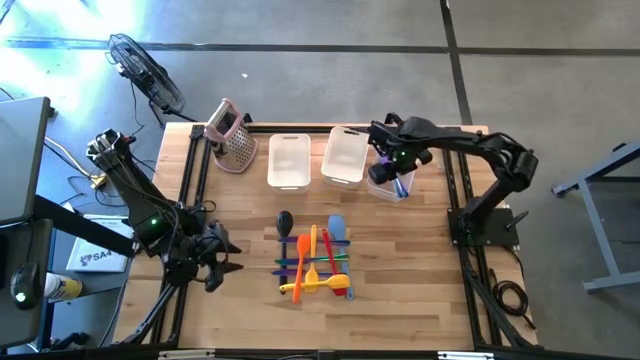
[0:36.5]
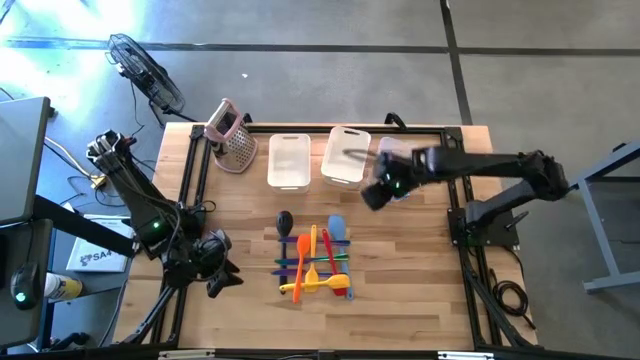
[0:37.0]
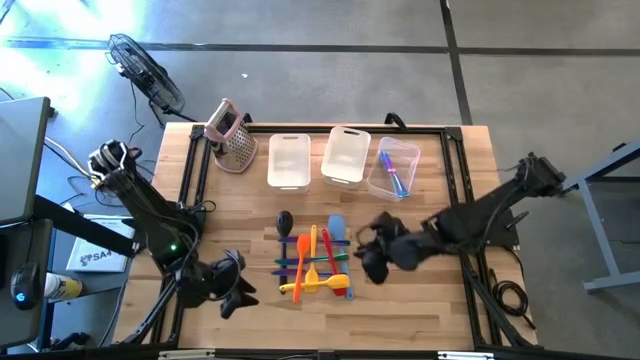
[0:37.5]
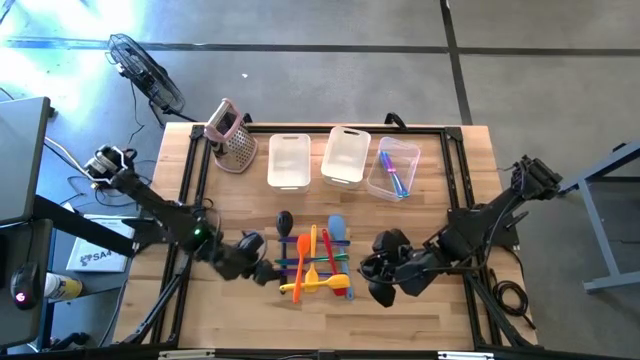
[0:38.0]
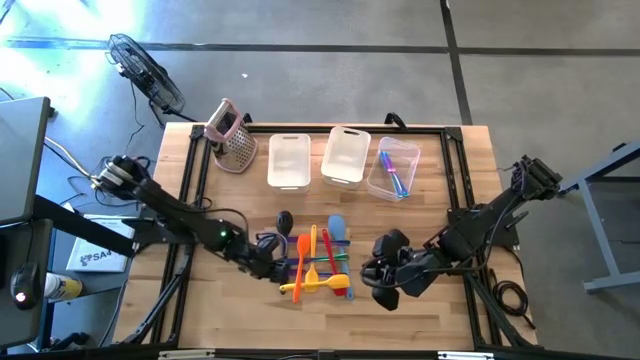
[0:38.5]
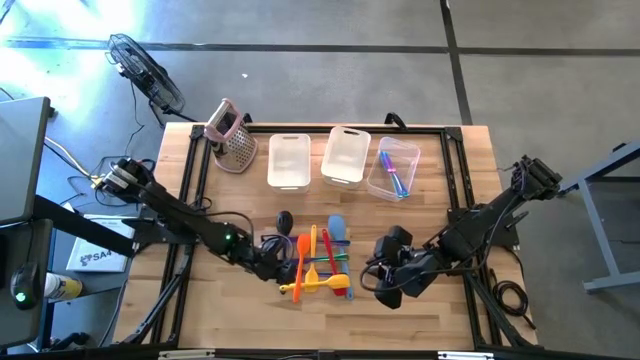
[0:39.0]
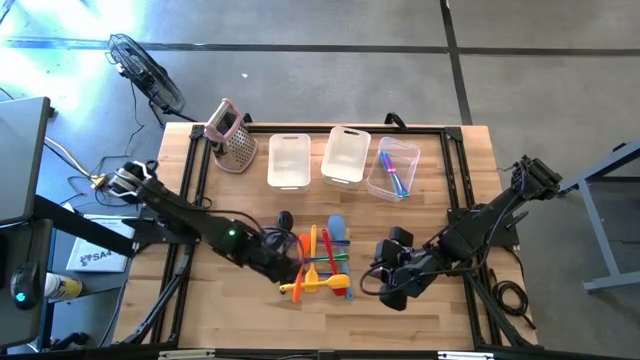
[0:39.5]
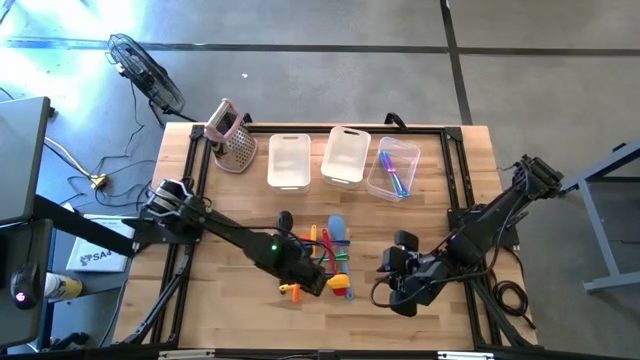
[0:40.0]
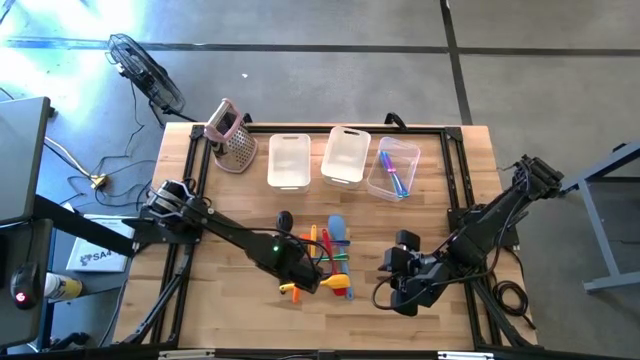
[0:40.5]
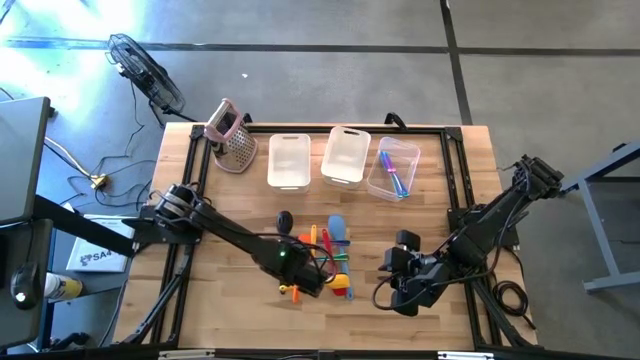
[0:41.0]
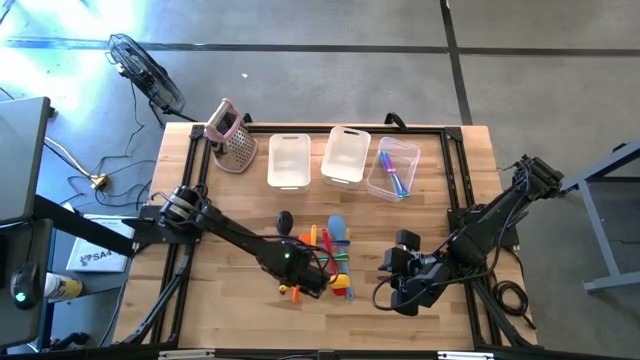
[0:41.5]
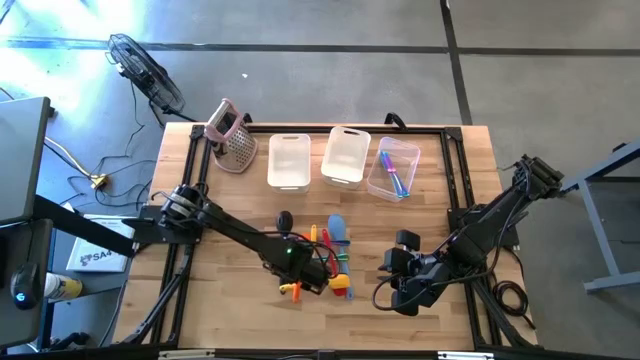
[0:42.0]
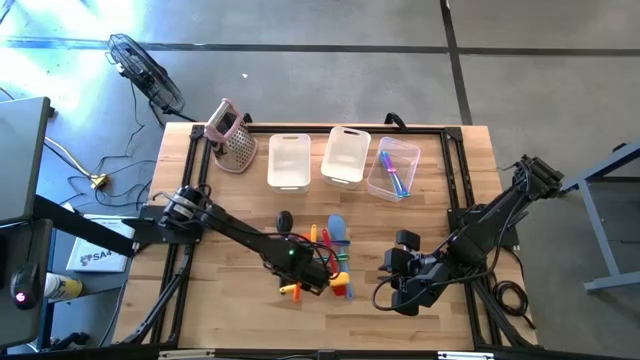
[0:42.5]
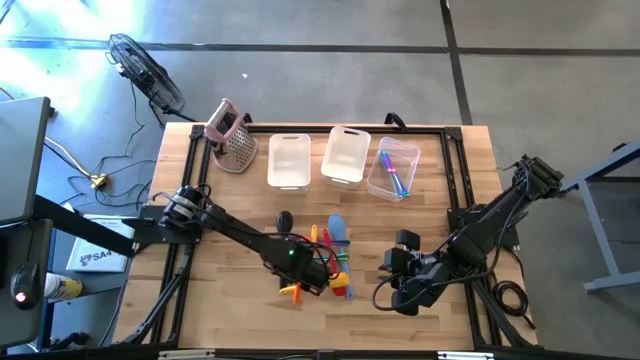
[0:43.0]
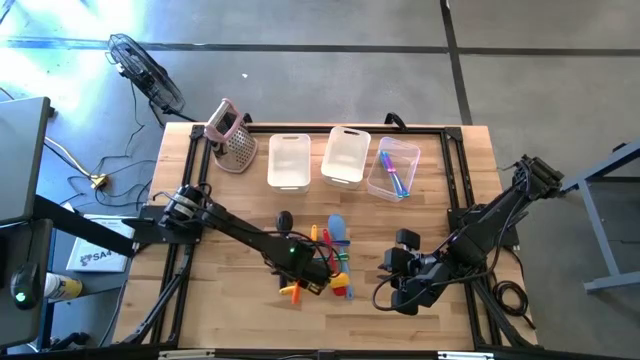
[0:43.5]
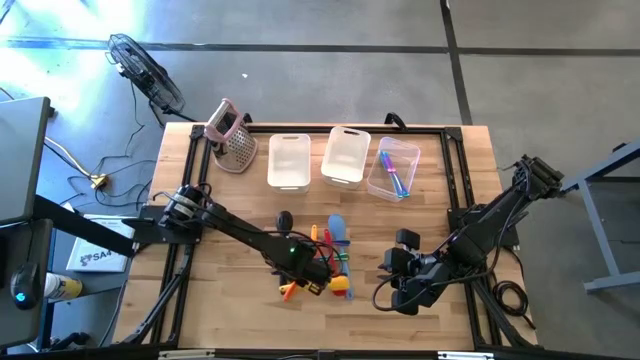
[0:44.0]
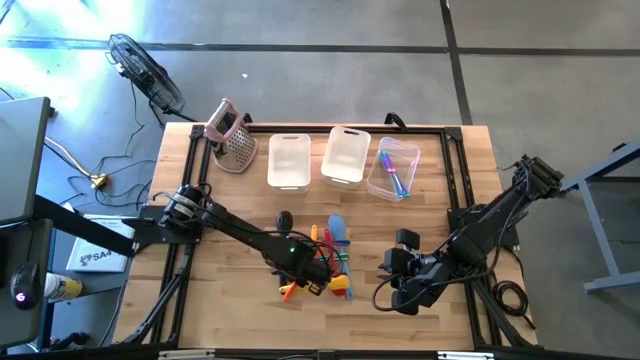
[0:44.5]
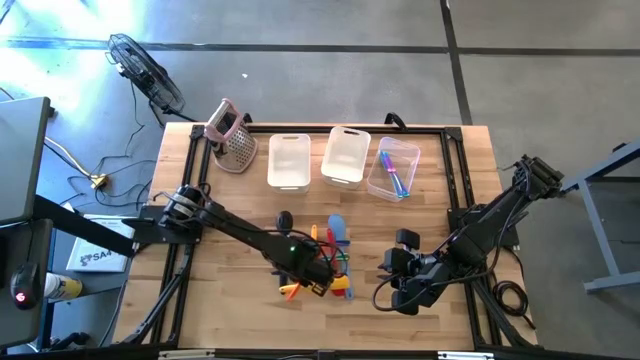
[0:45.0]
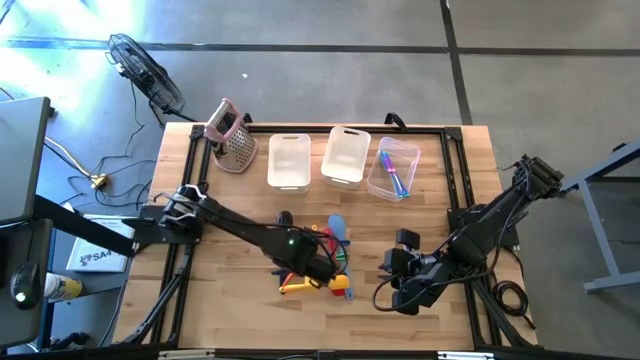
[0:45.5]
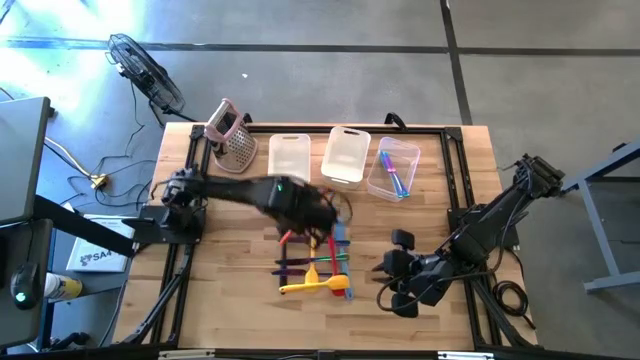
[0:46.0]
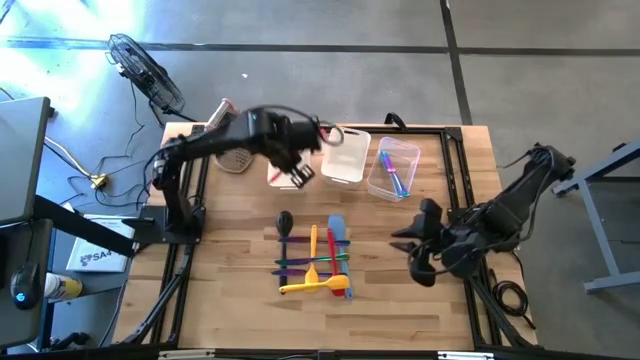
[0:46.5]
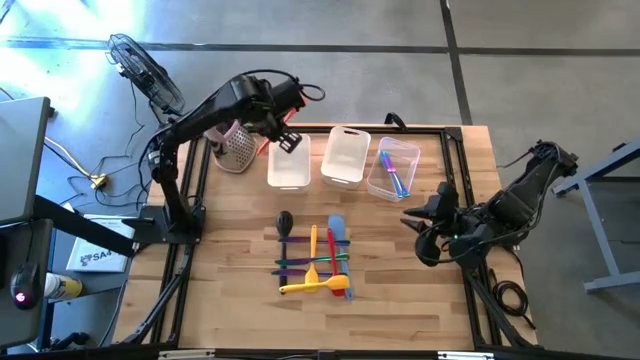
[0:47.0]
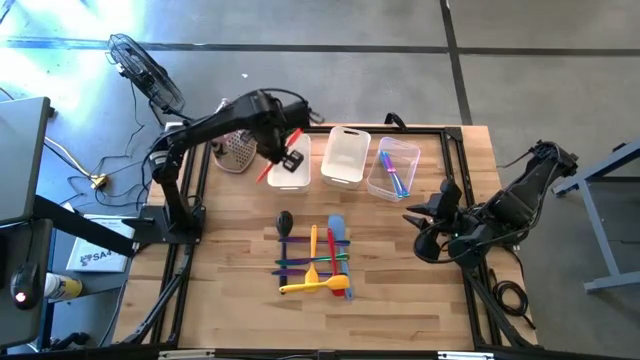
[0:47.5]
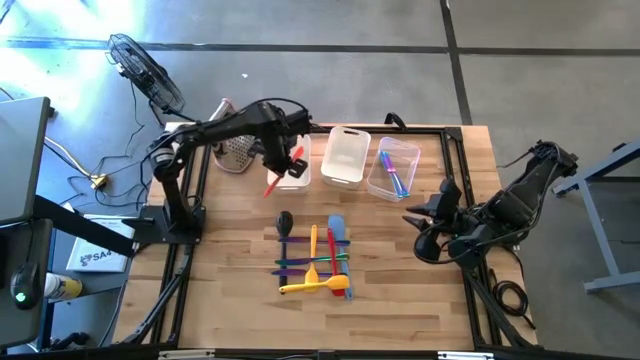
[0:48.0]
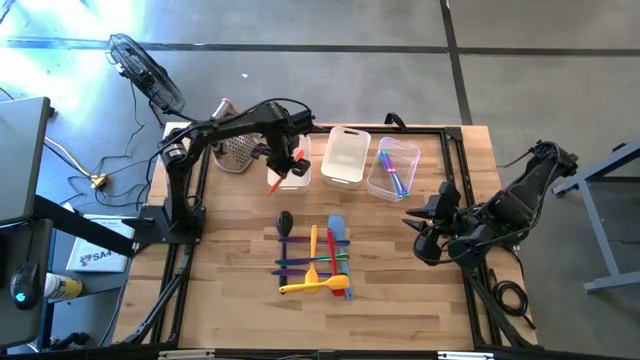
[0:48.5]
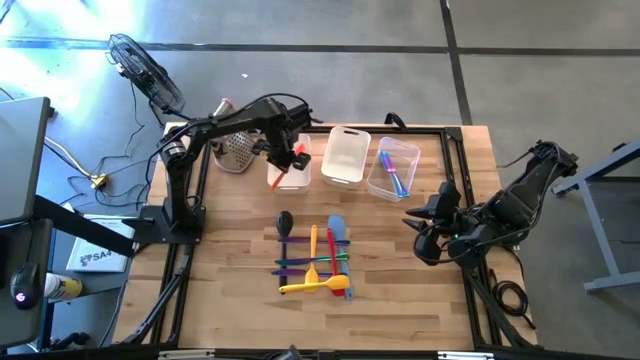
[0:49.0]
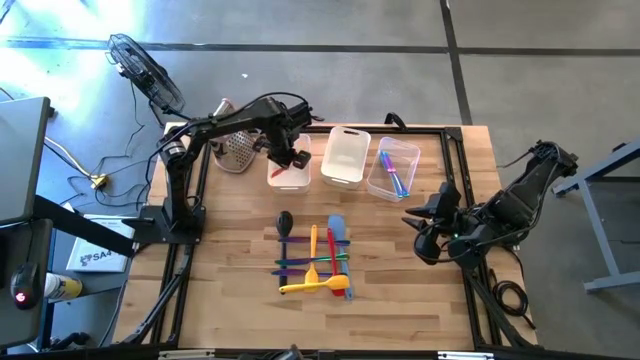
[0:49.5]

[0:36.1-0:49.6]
Task: Pick & Place Kitchen Items
Put the orange spatula into the left white bin

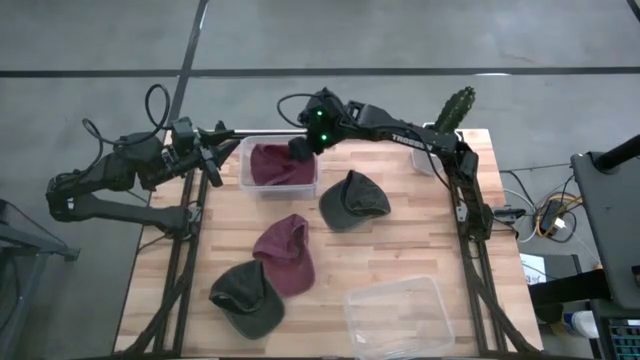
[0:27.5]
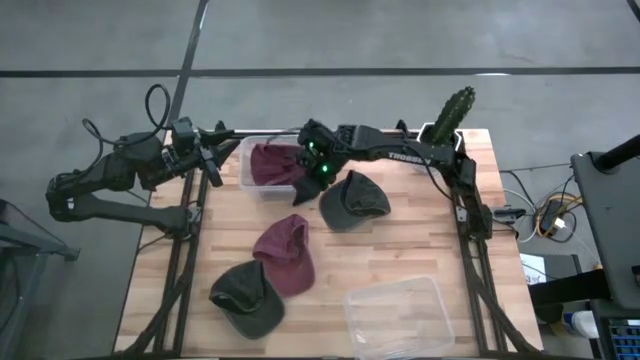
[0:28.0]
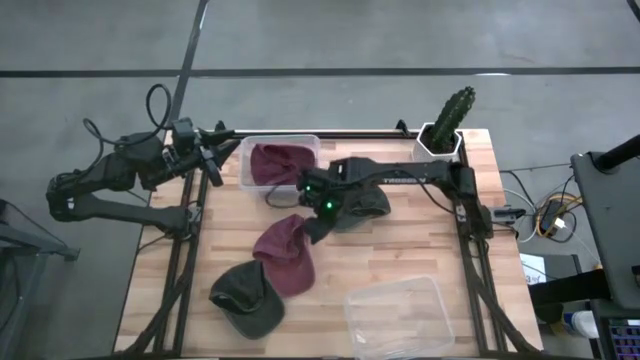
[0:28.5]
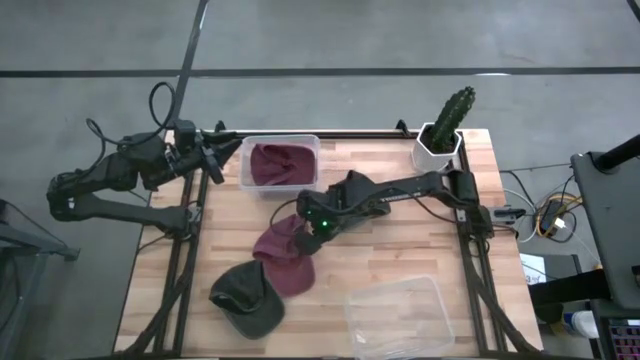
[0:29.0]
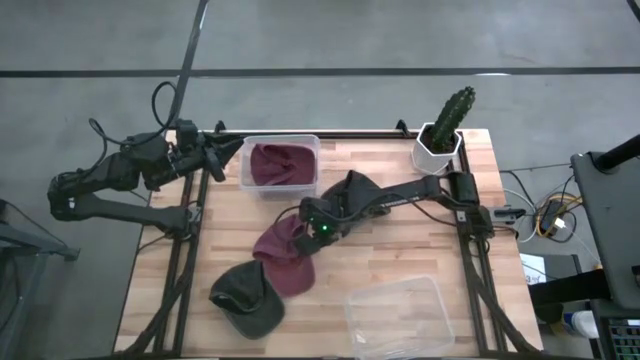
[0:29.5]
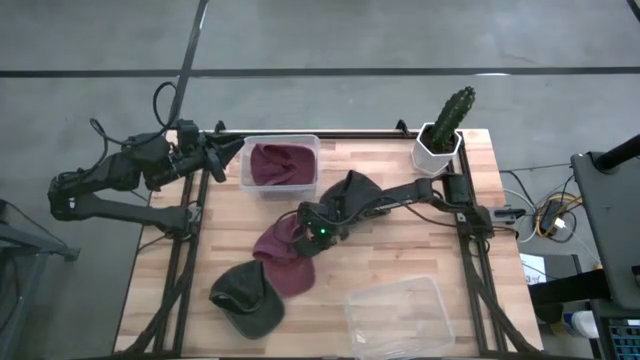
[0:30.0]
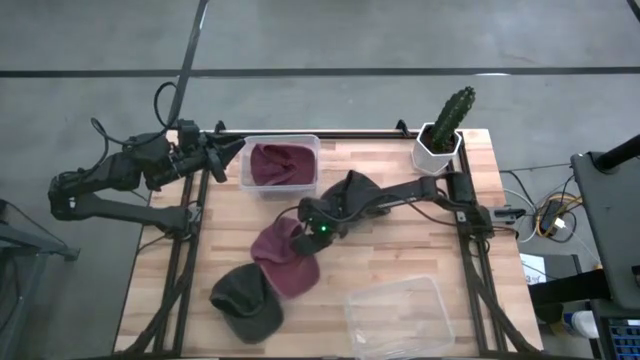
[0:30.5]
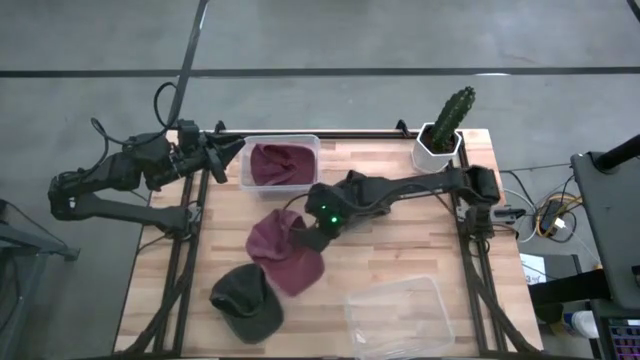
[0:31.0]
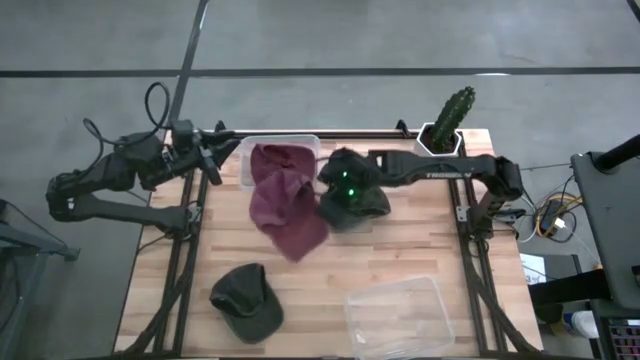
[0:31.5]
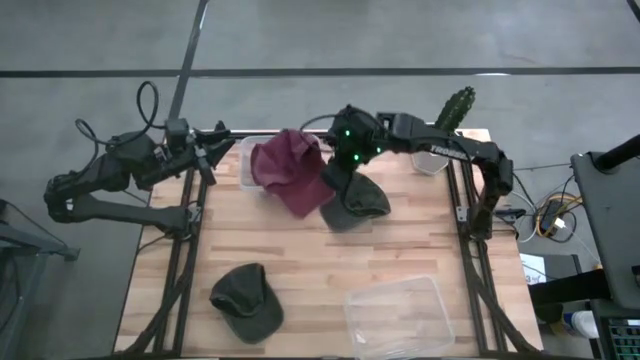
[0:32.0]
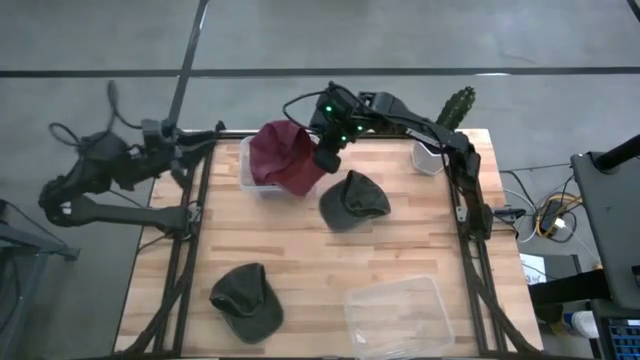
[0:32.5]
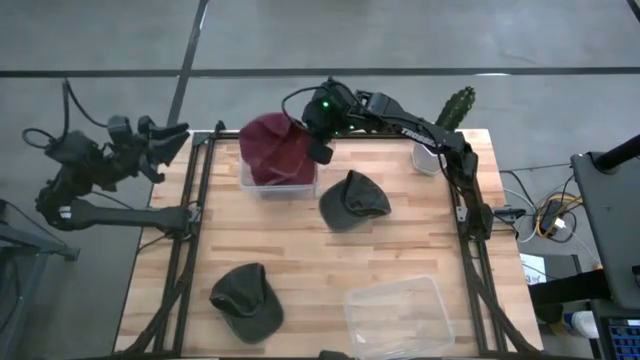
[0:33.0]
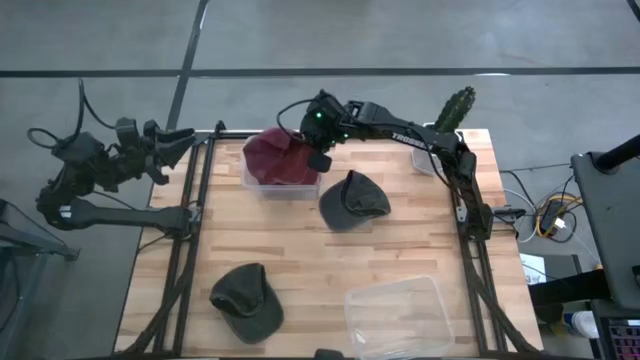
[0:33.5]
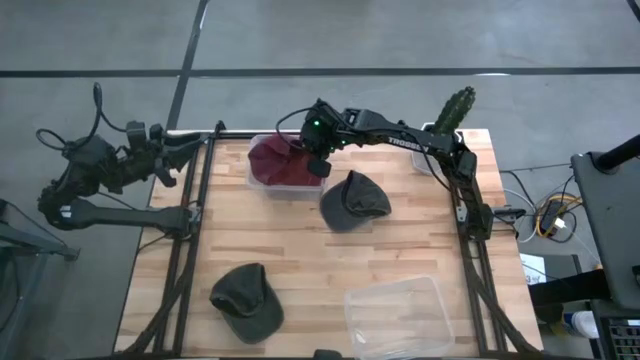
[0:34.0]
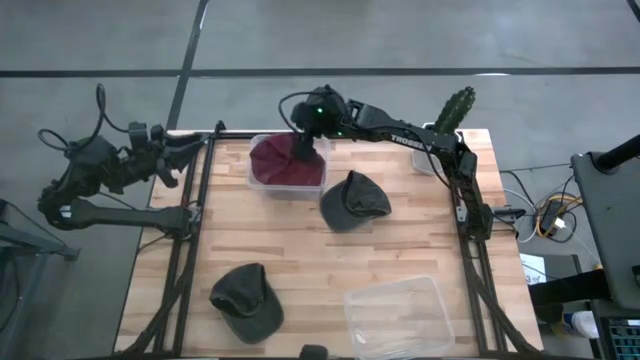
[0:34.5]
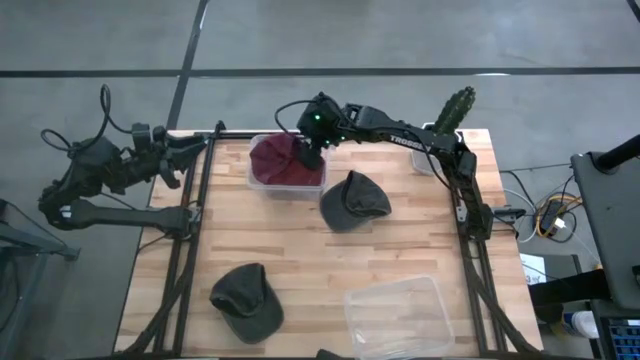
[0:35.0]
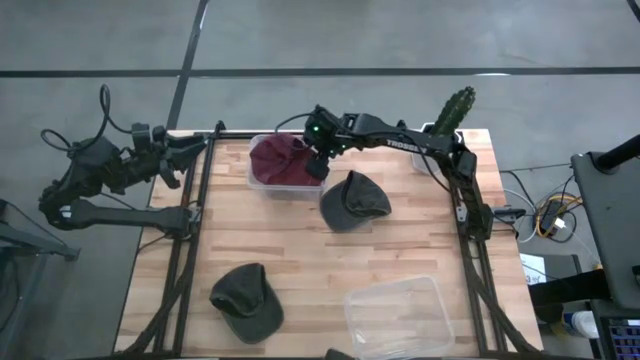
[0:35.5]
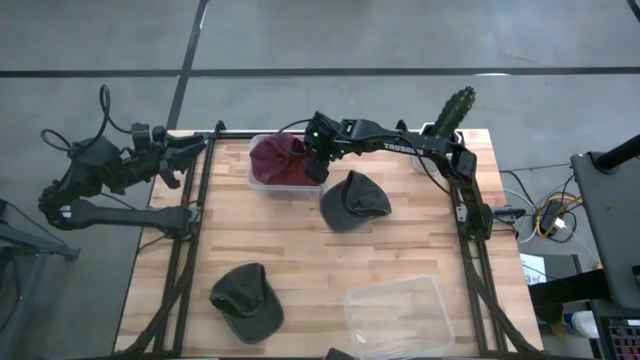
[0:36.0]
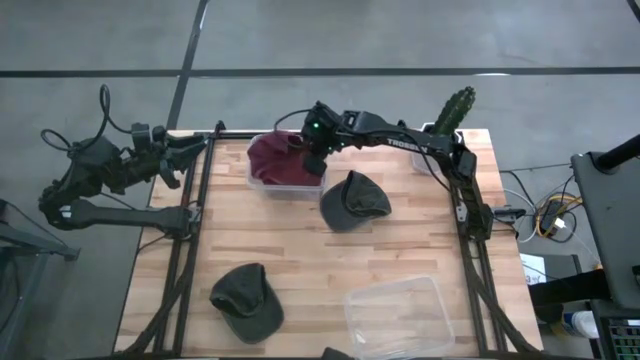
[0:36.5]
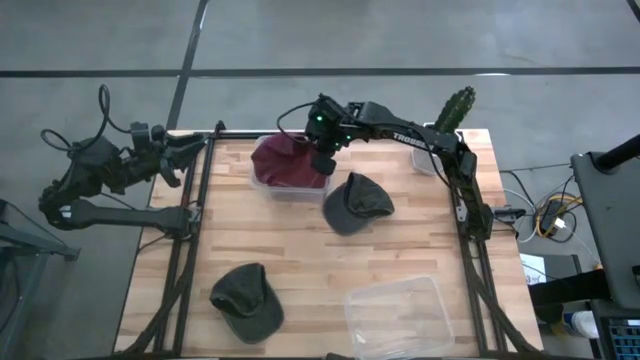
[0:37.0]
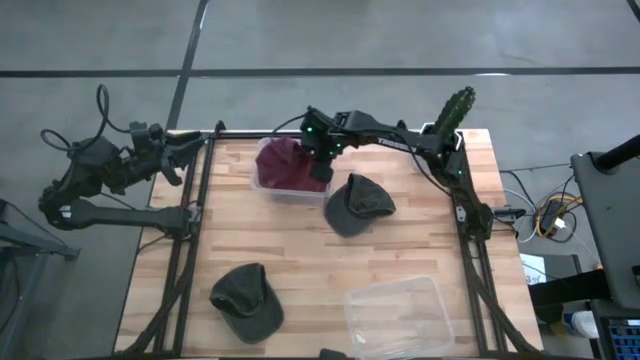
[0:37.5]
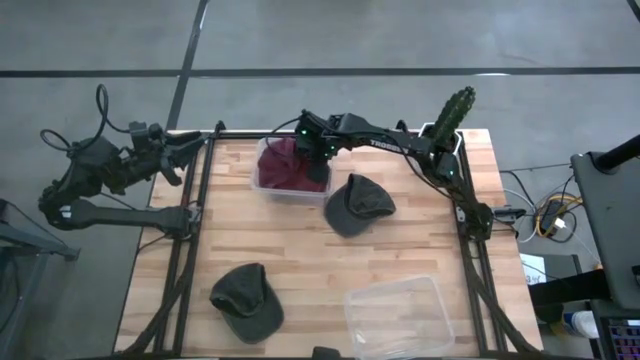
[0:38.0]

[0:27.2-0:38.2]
Task: Pick and place caps into container
Put the red cap into the top transparent container
